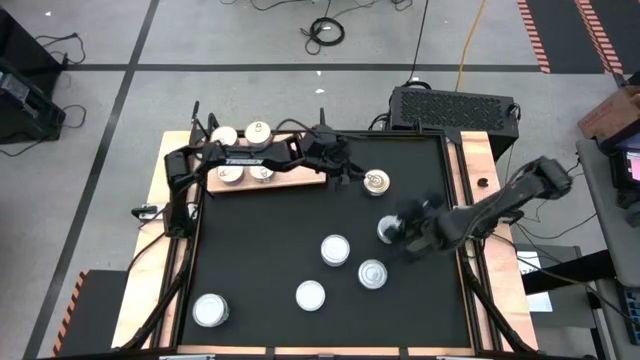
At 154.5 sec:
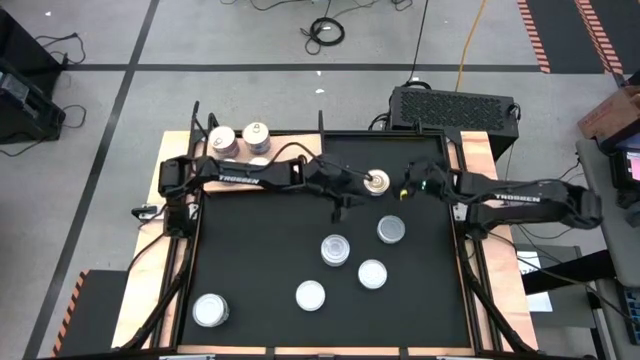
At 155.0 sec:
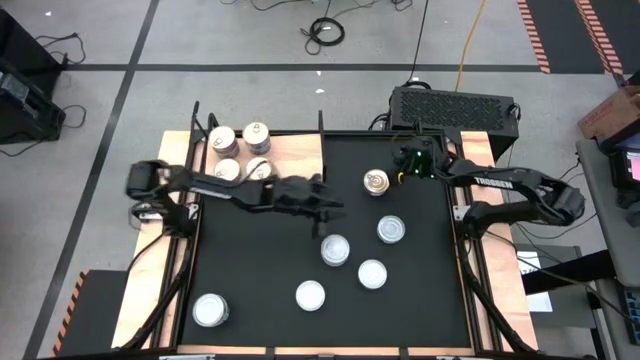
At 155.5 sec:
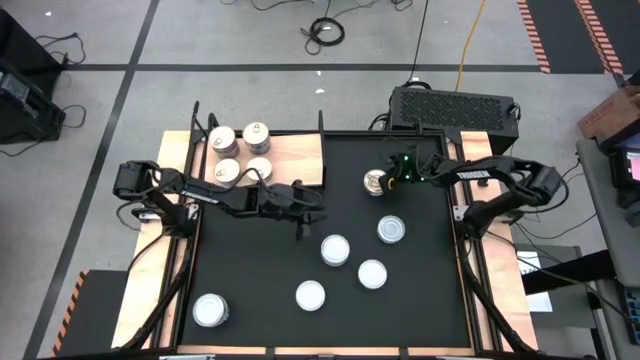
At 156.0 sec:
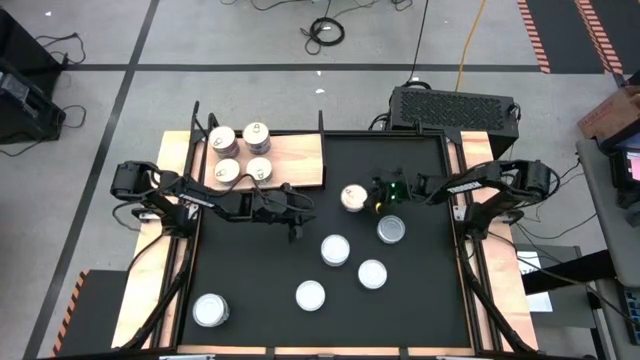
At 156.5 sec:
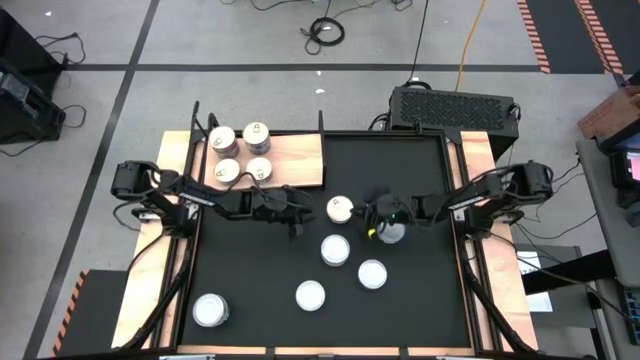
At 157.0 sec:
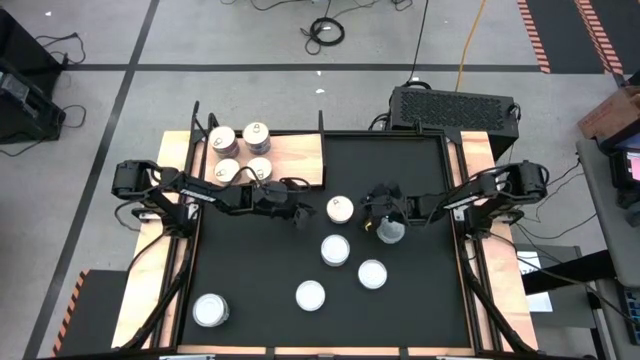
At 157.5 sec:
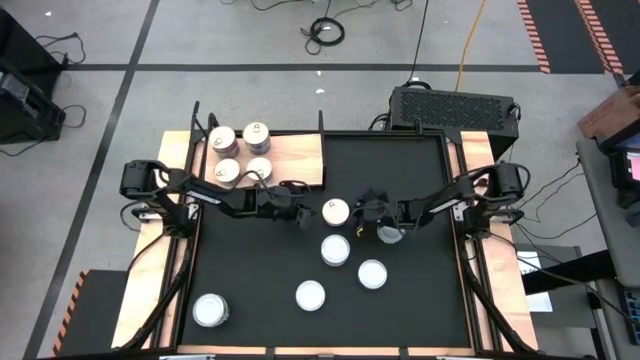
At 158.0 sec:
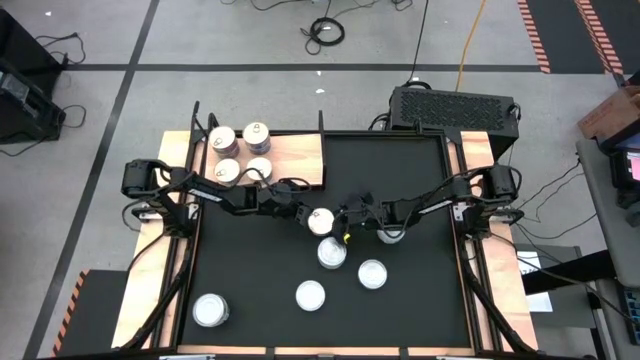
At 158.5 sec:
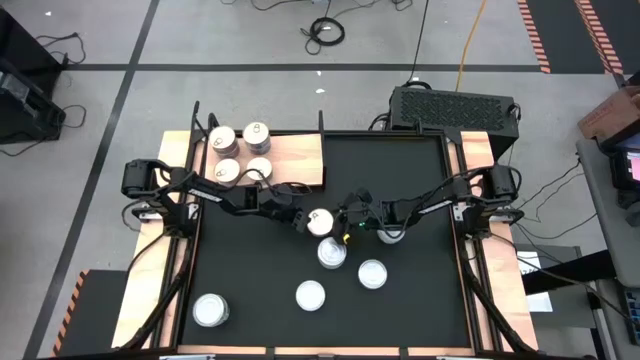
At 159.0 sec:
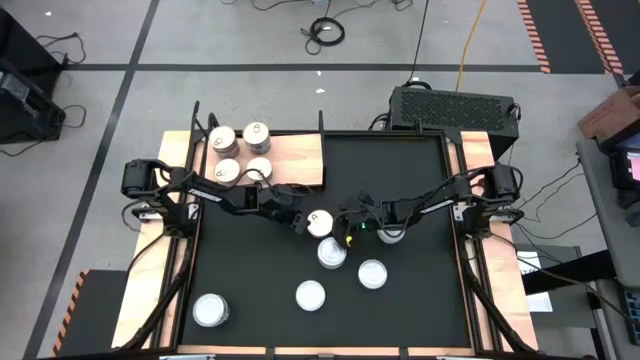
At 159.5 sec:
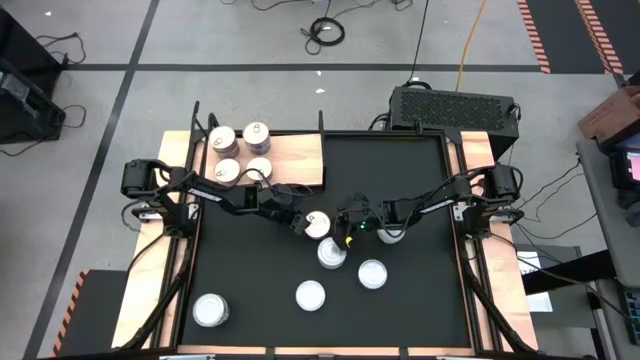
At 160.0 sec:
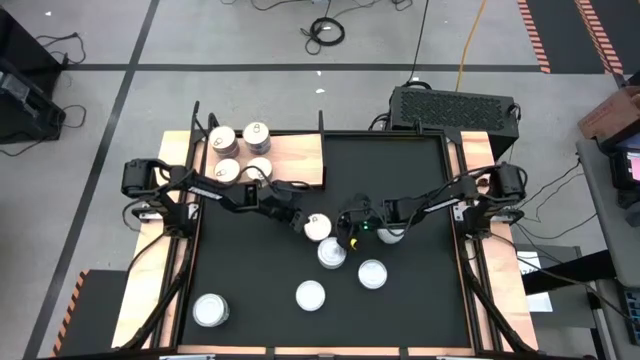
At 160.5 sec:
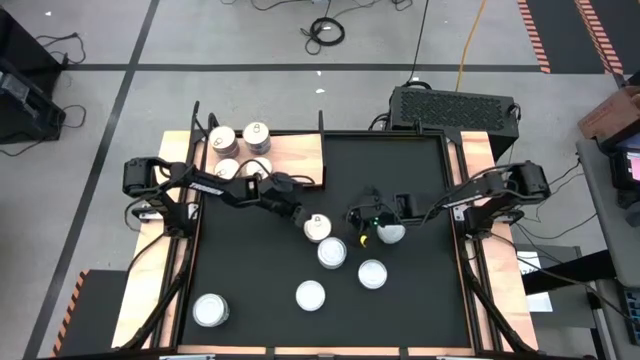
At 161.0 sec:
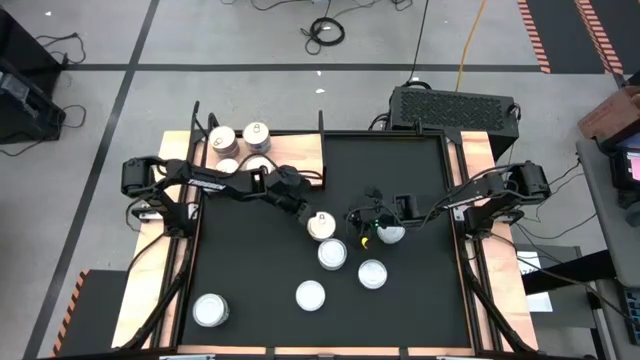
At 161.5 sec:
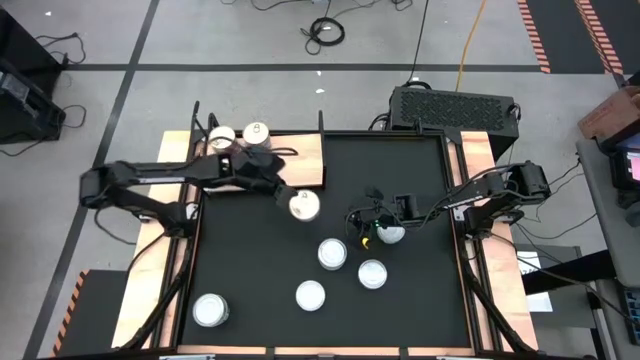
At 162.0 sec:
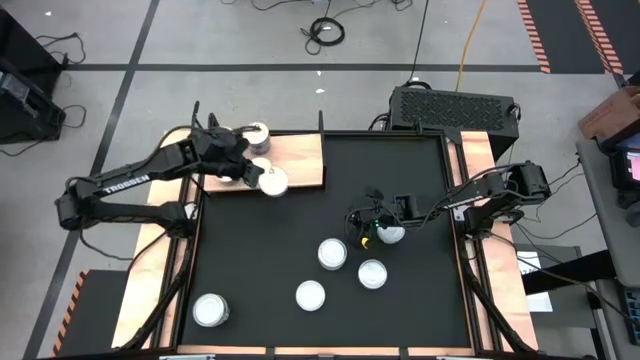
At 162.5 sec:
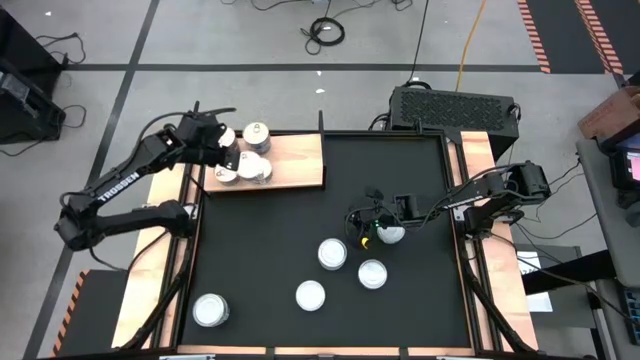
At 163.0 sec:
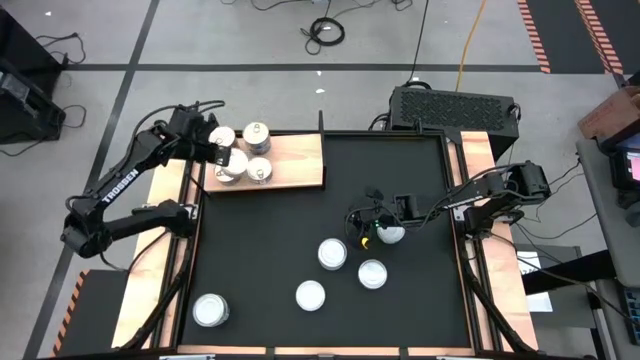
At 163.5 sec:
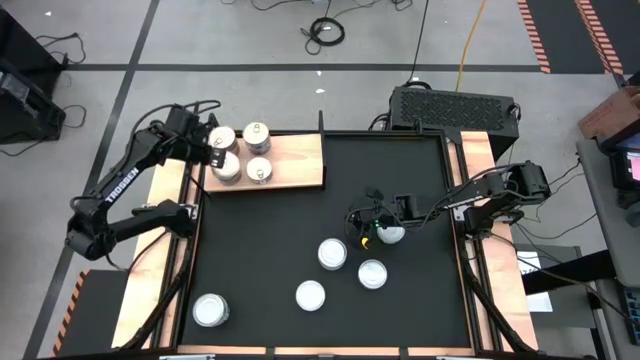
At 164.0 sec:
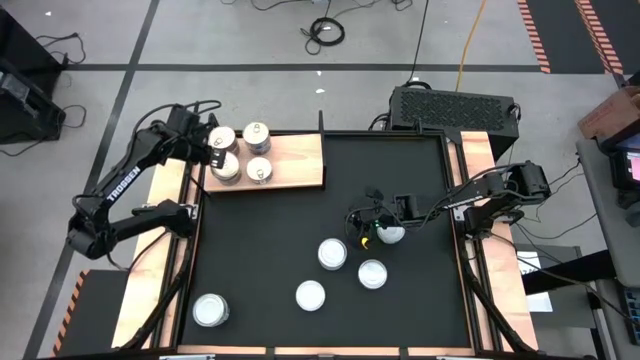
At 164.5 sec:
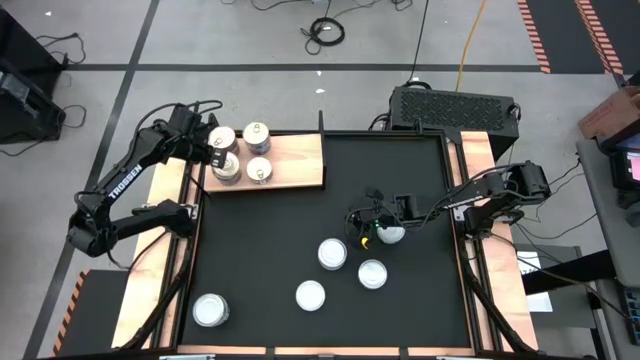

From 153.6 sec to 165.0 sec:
Task: Stack canned seafood by type on shelf
Stack the blue and pink tuna can on top of the bottom left blue and pink tuna can on the shelf

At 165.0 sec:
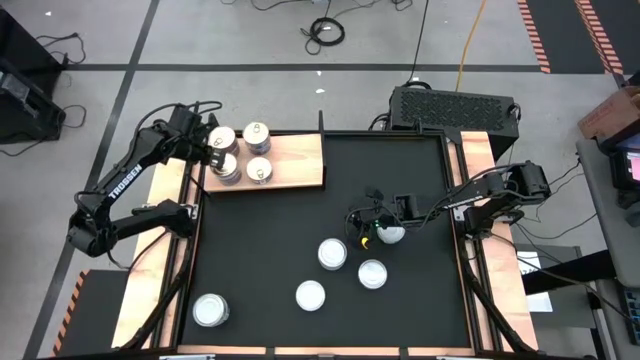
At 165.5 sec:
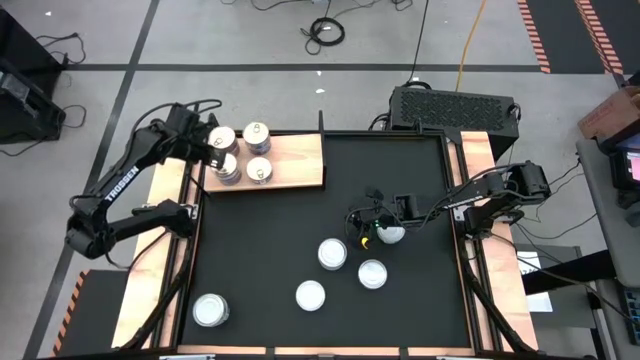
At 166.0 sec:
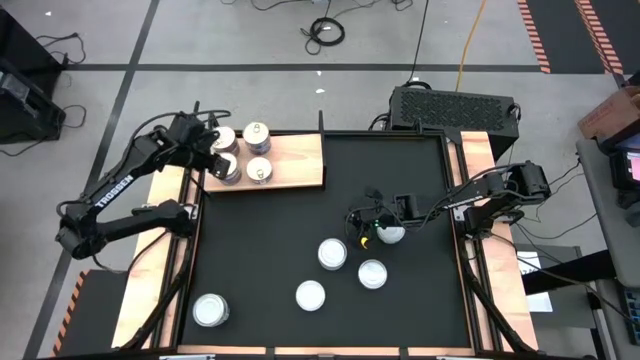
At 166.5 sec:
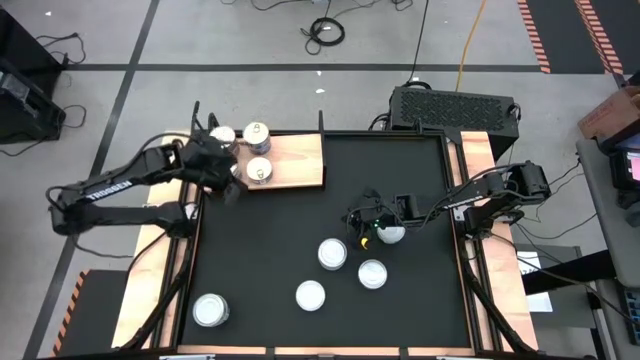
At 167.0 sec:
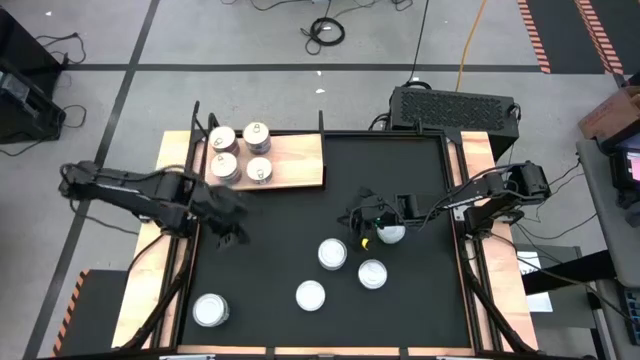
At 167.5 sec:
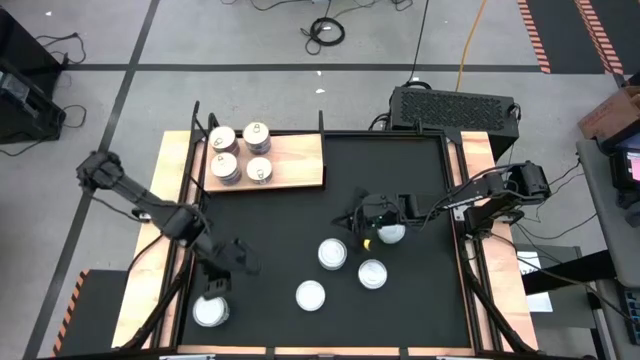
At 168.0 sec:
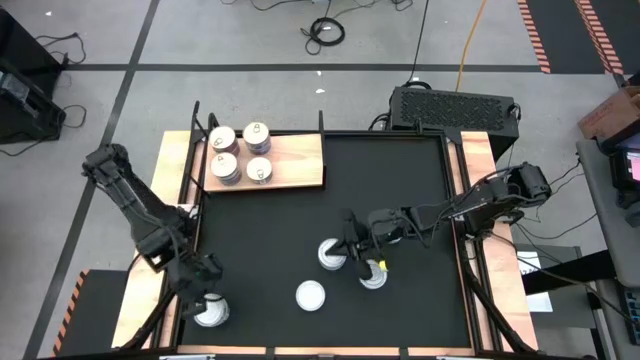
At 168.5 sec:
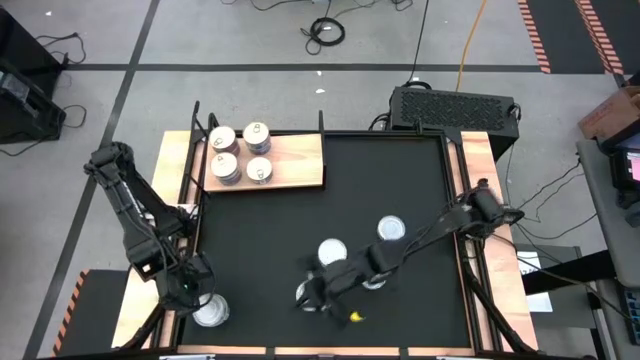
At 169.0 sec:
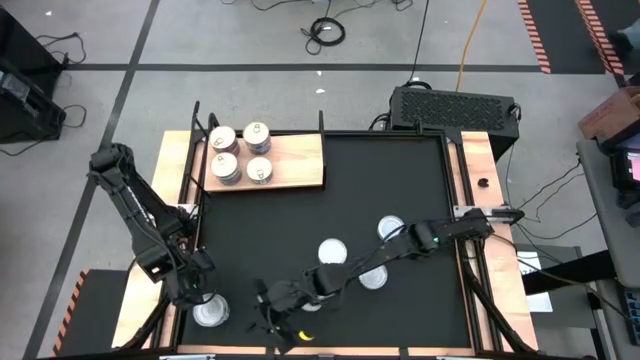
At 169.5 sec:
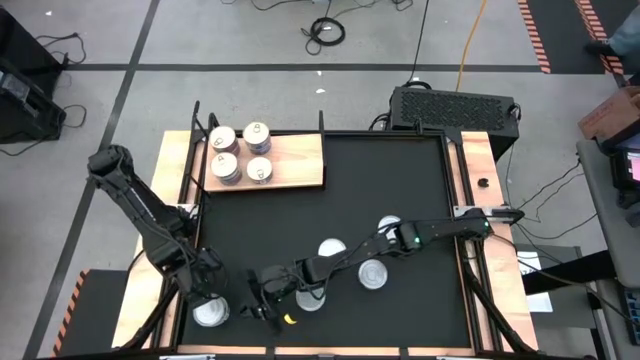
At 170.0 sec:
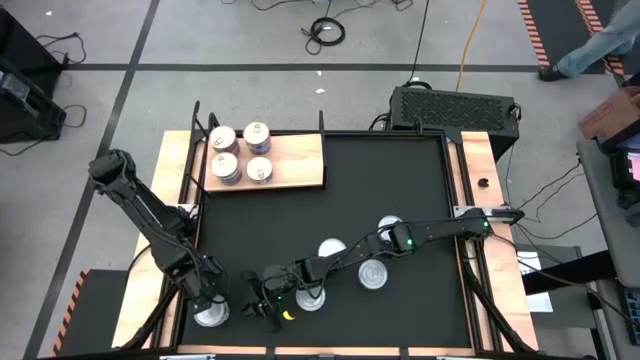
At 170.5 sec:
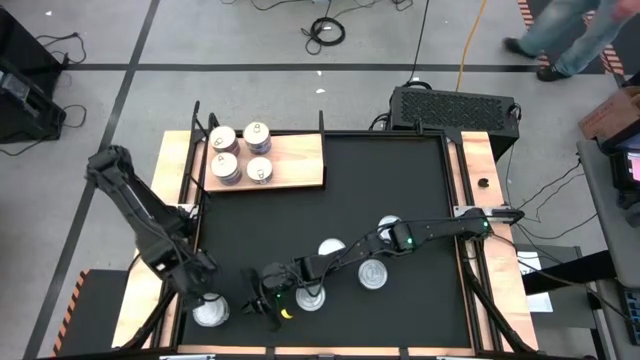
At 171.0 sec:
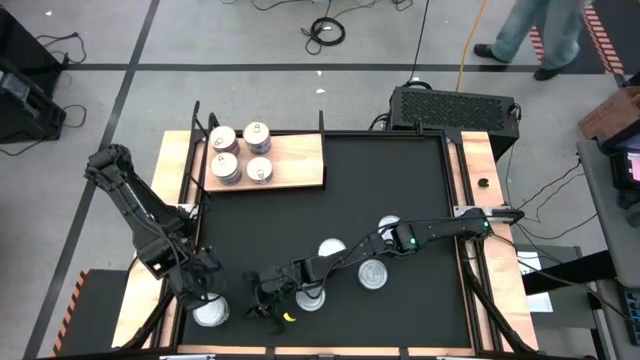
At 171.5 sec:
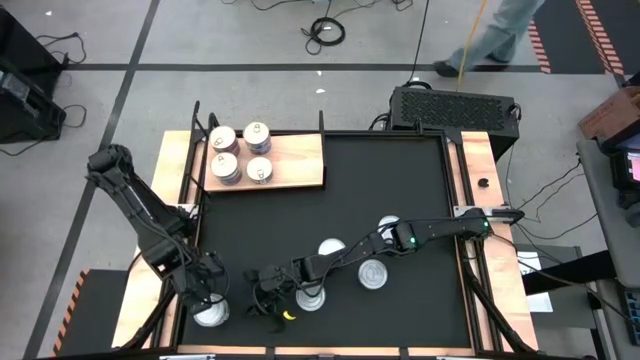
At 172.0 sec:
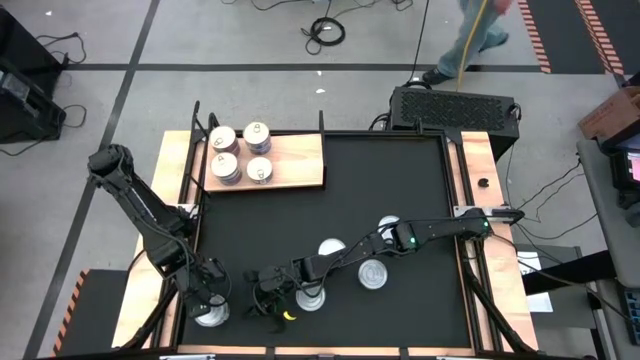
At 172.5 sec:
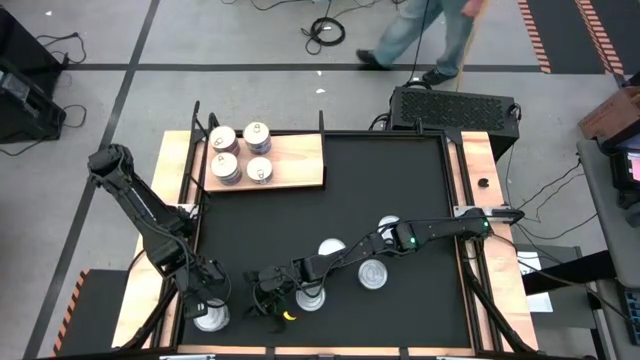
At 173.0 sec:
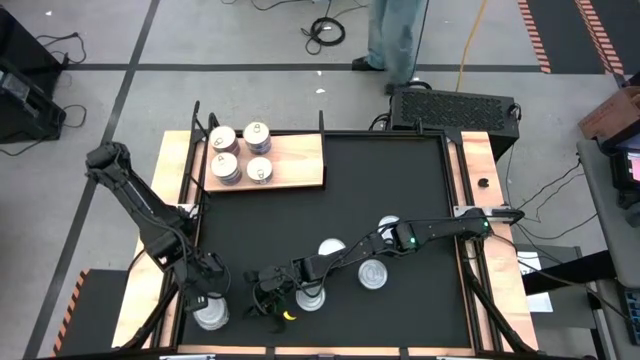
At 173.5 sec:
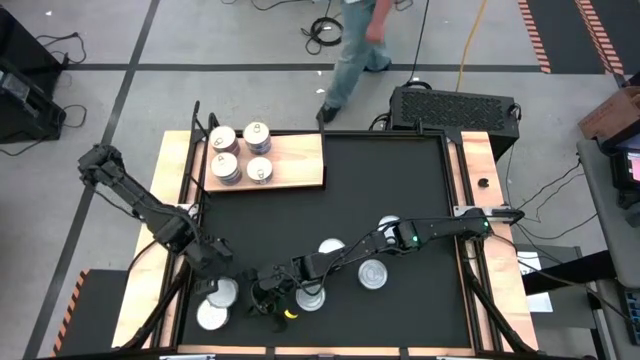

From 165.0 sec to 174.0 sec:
Remove the green and white tuna can from the top of the blue and pink tuna can

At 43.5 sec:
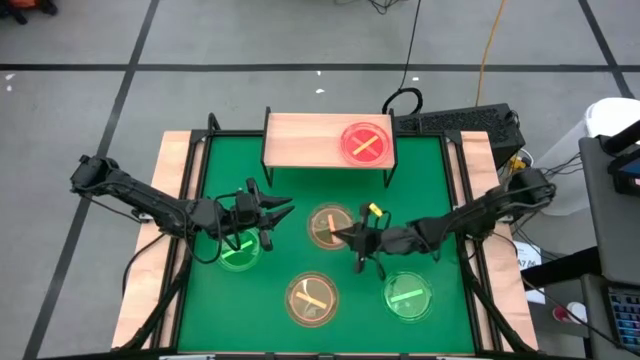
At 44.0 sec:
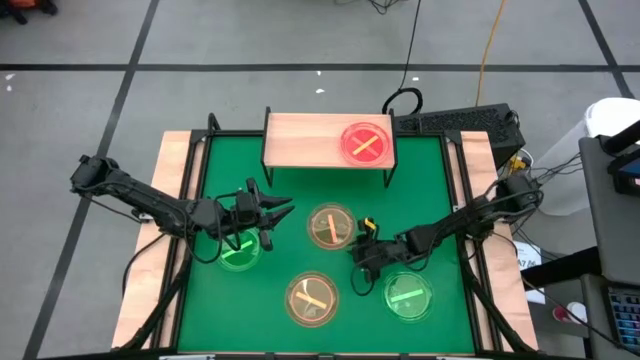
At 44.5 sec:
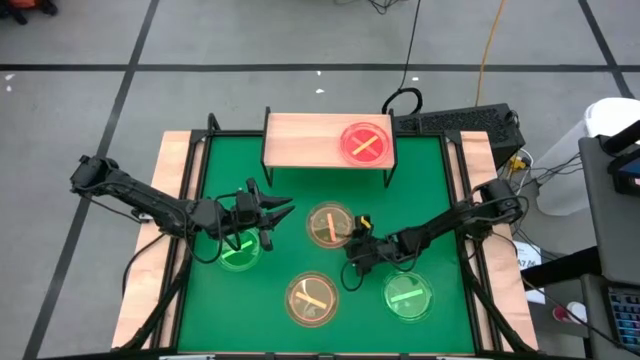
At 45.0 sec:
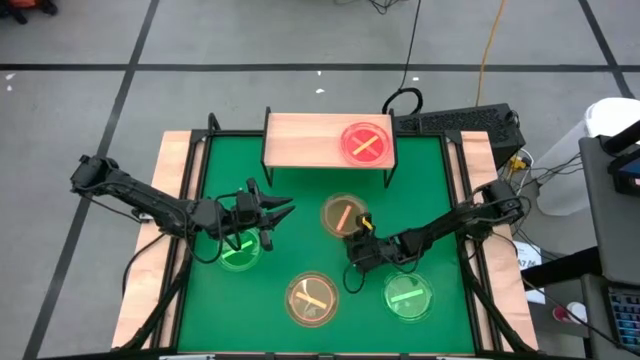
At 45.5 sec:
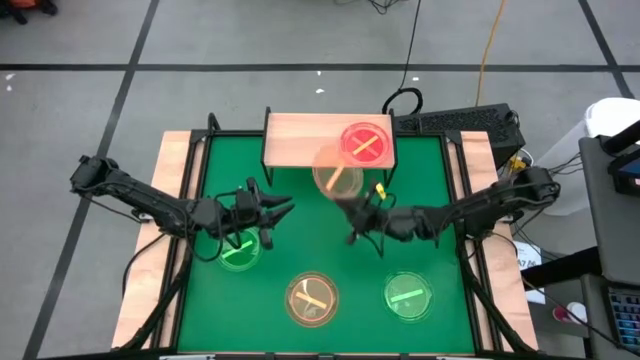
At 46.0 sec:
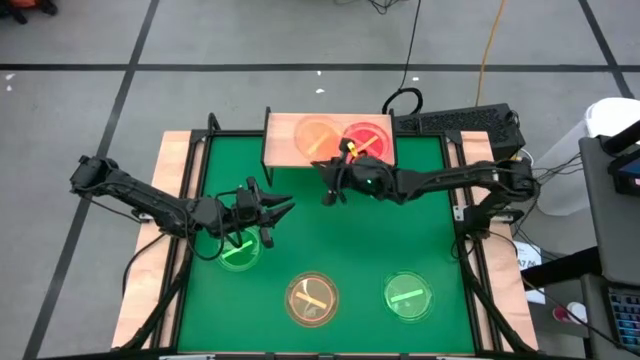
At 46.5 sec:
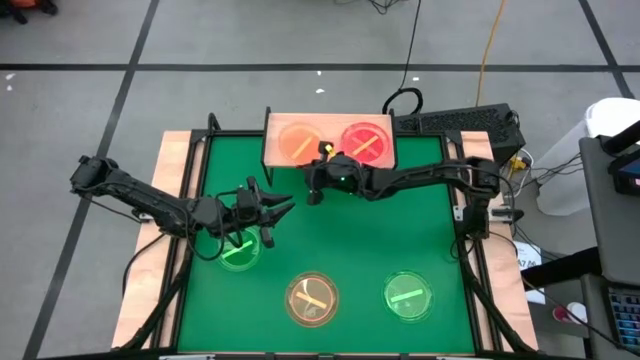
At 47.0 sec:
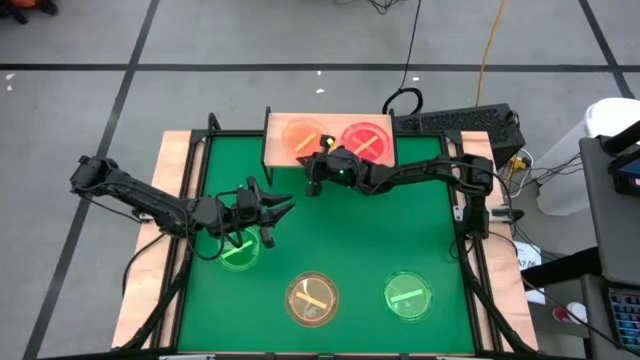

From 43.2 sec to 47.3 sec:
Task: Place and stack plates onto a shelf
Put the top orange plate on the shelf
